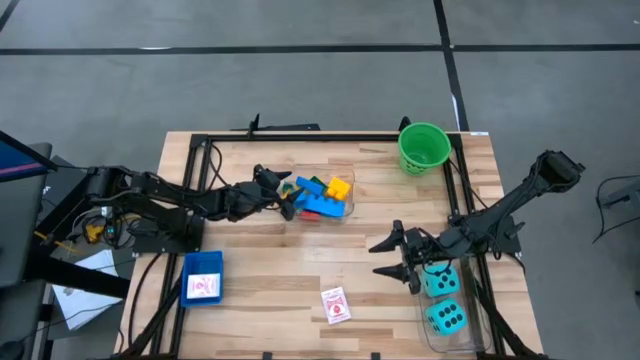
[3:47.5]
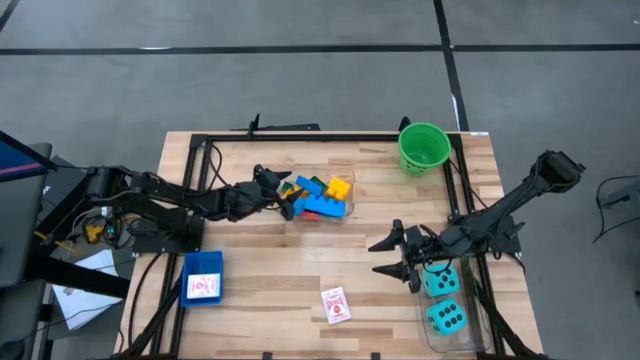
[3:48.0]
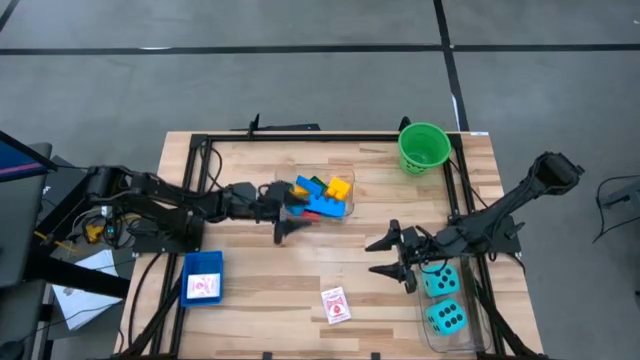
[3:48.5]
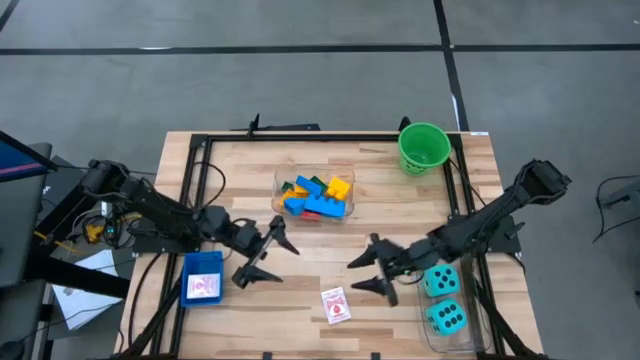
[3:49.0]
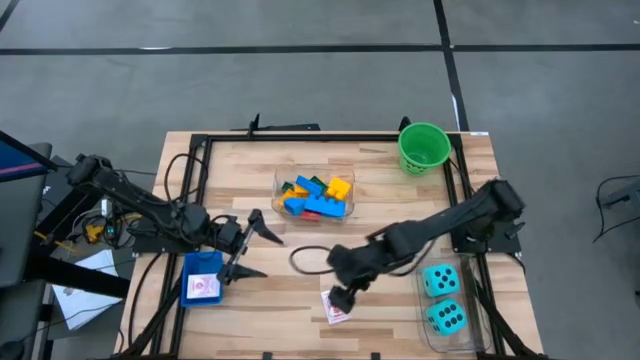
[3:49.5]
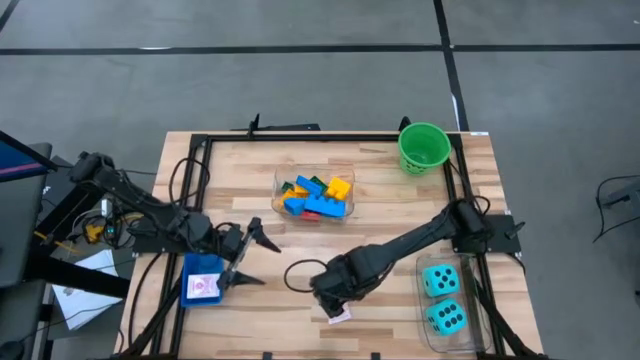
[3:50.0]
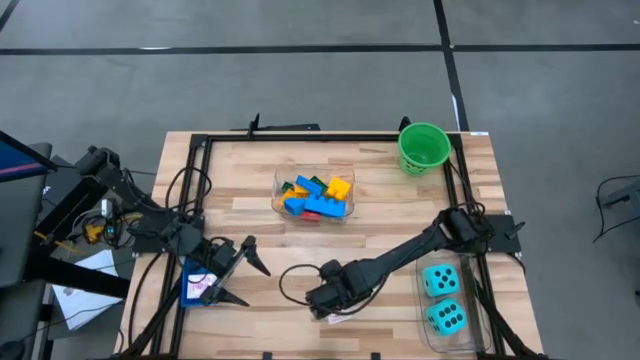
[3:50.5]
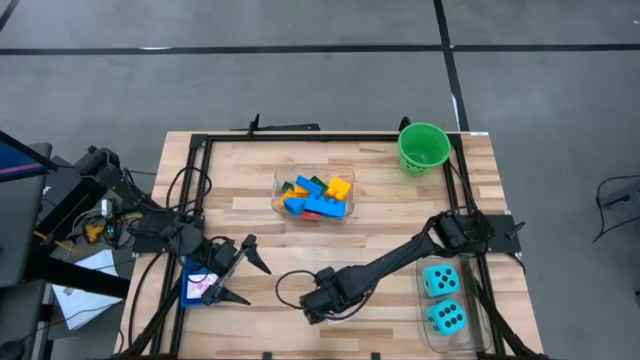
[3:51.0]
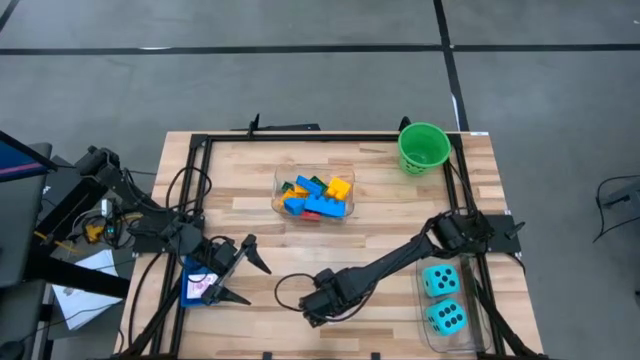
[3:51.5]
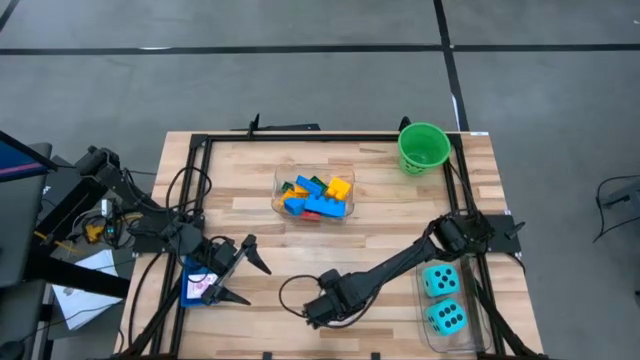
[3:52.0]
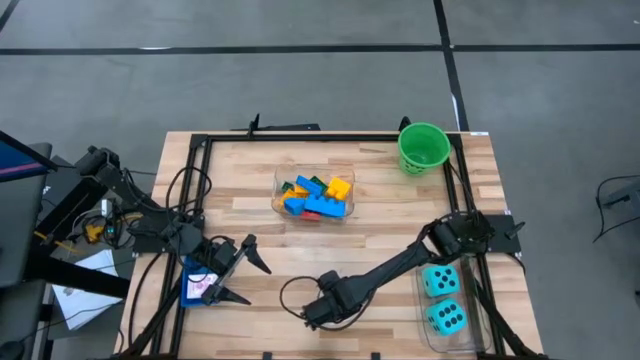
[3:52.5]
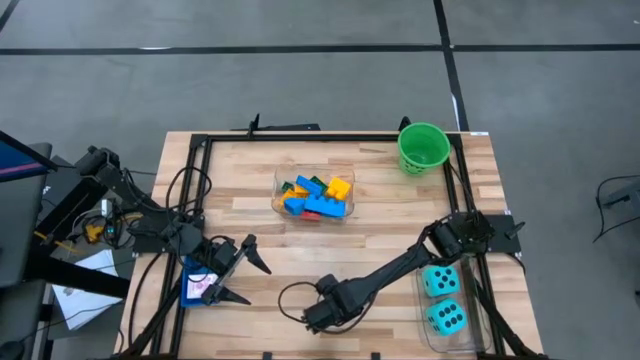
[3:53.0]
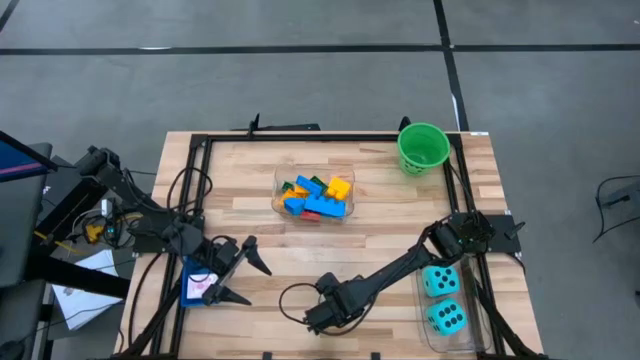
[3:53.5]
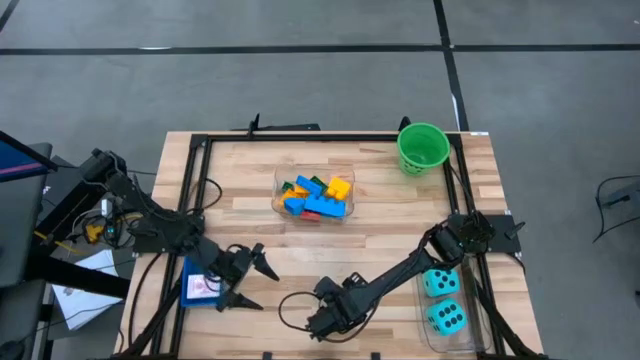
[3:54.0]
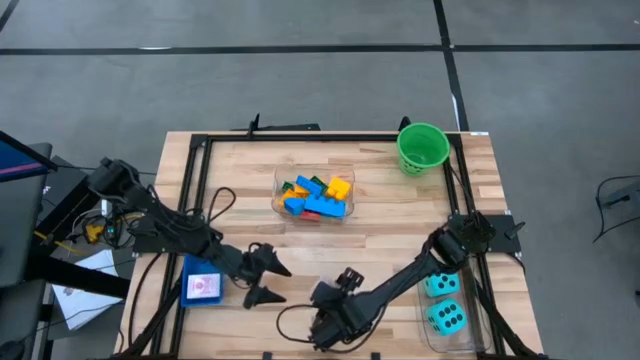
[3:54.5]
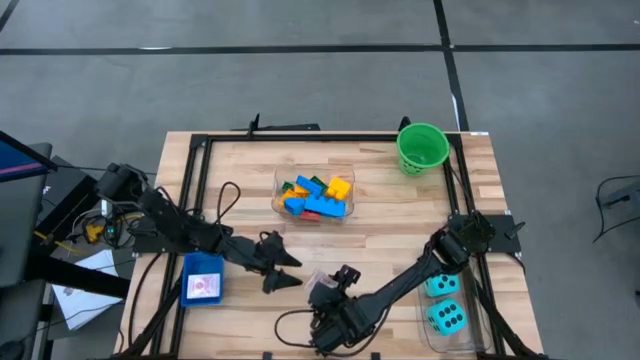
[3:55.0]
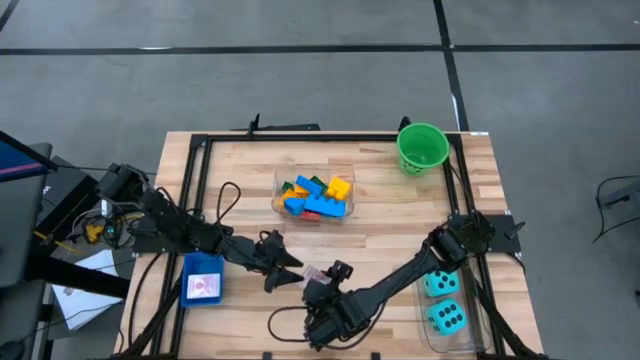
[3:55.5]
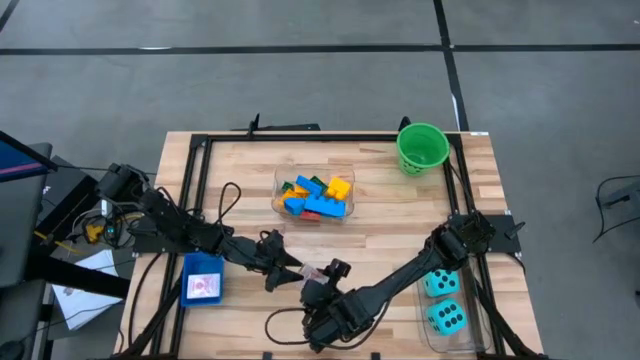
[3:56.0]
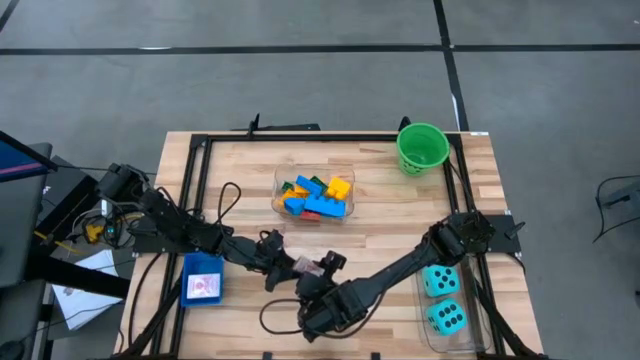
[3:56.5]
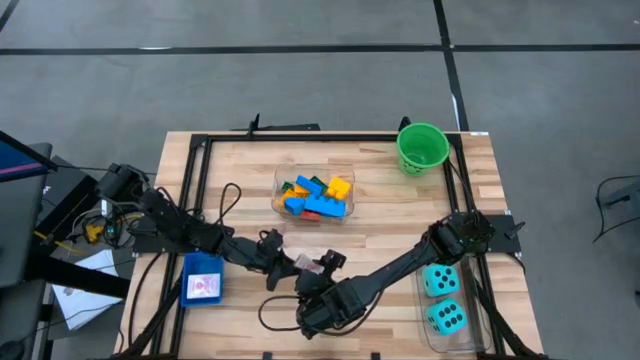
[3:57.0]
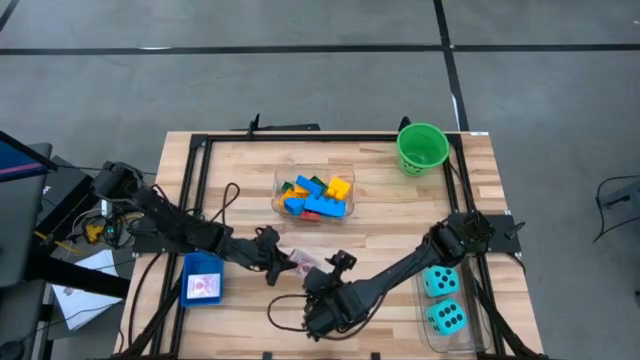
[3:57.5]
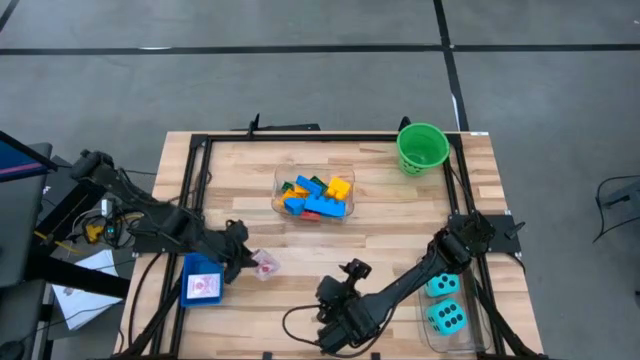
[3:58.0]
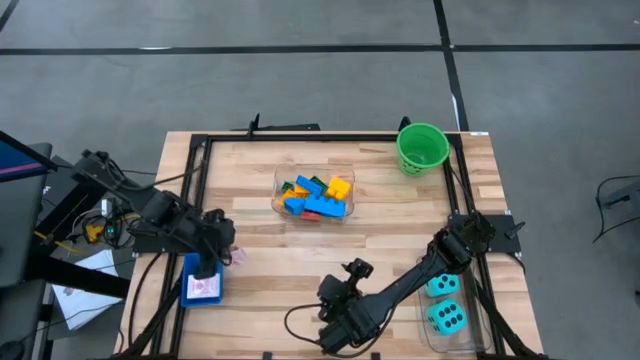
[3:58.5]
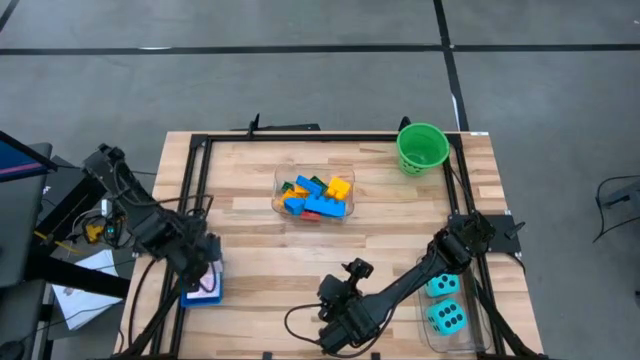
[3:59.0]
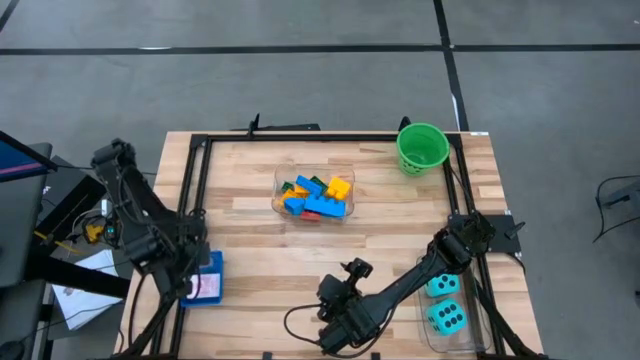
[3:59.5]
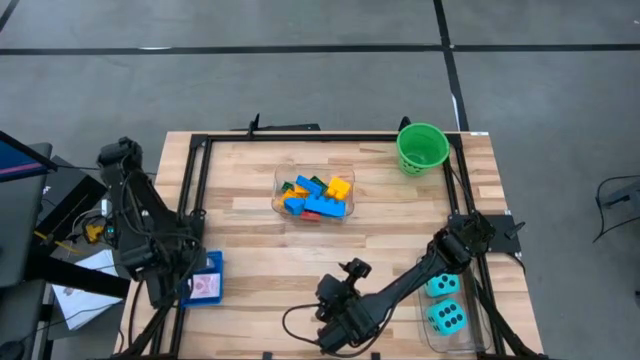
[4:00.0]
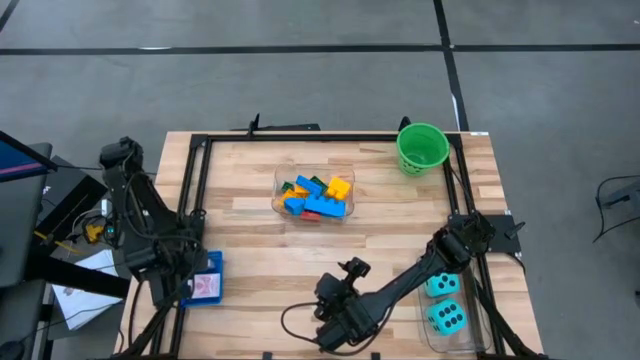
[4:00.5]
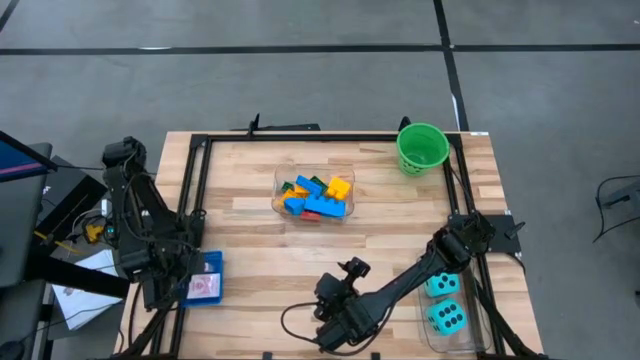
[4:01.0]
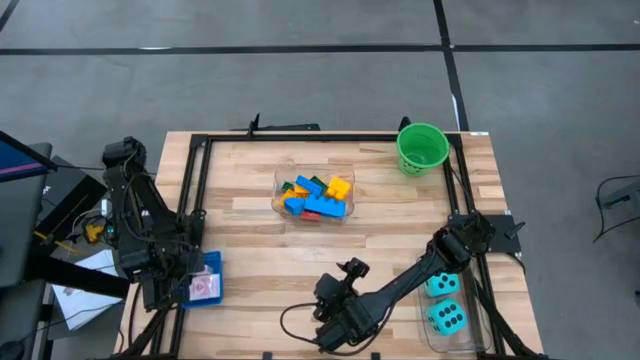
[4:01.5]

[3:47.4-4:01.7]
Task: Pick & Place Toys
Put the red playing card box into the blue bin

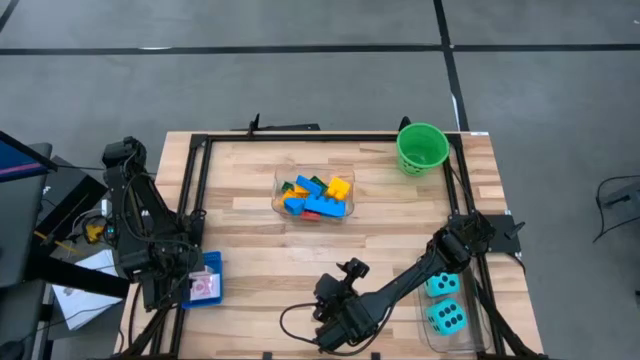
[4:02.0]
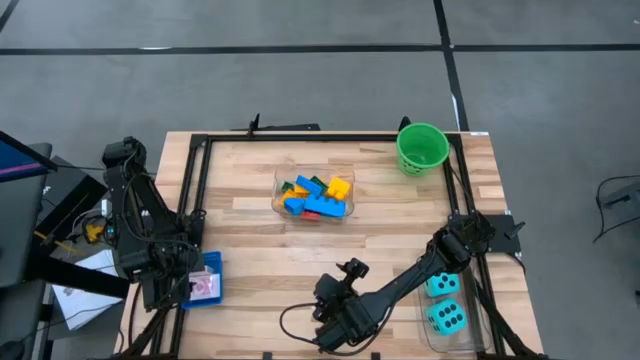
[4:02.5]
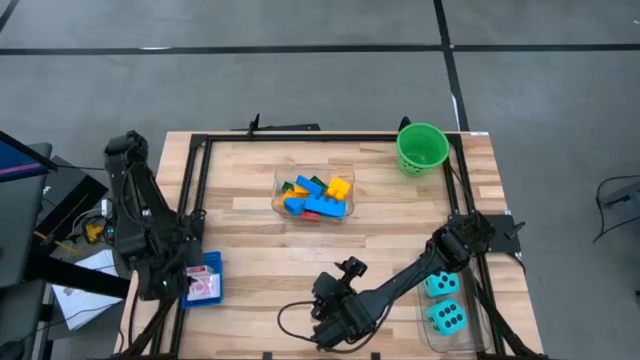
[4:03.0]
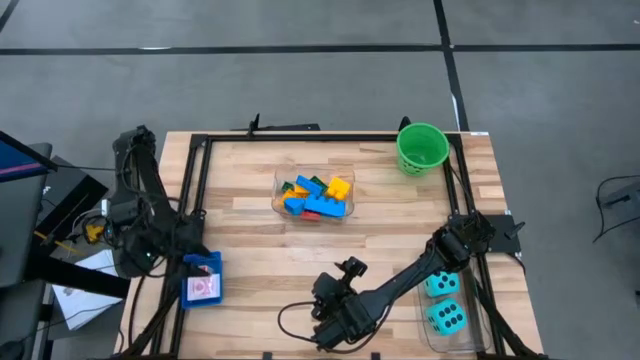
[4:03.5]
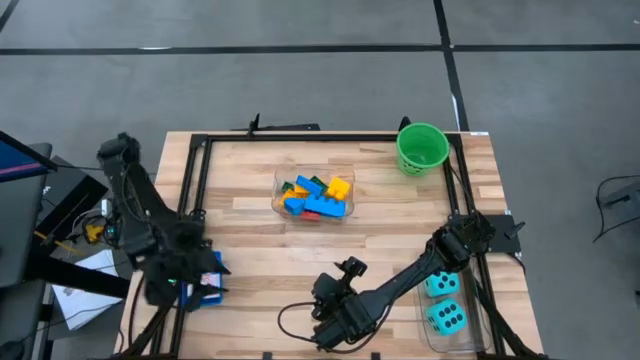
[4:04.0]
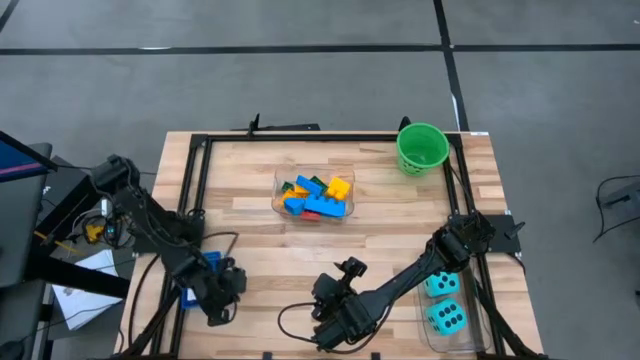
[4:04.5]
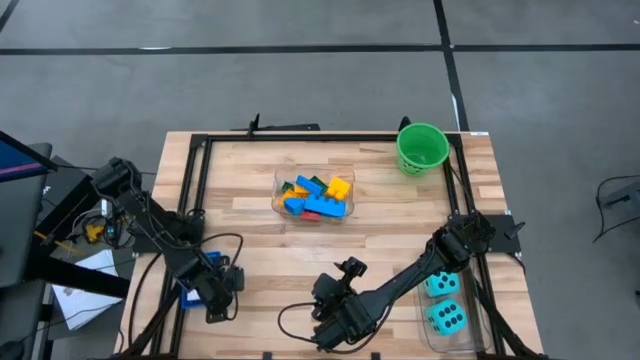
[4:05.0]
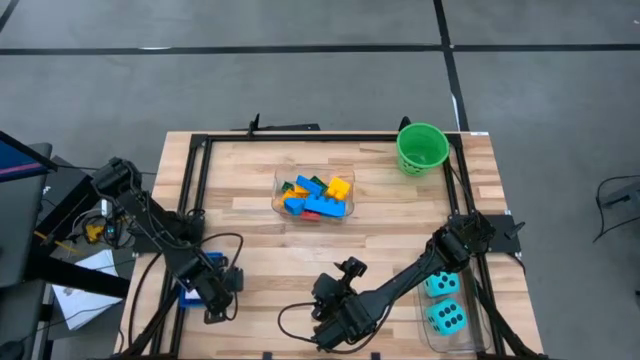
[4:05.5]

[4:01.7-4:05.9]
Adjust the blue bin on the table

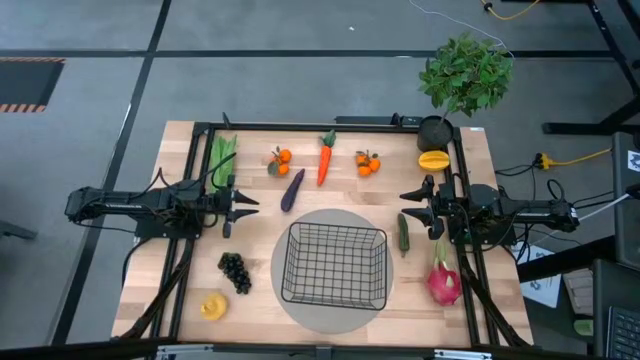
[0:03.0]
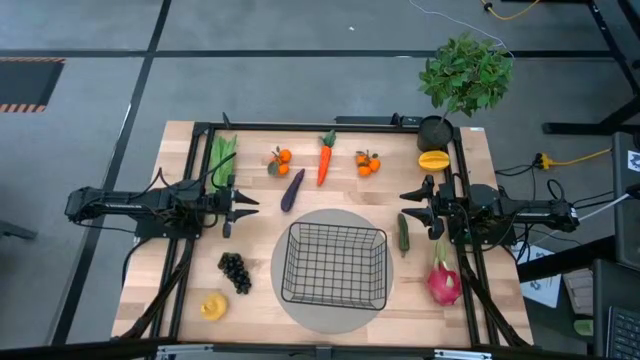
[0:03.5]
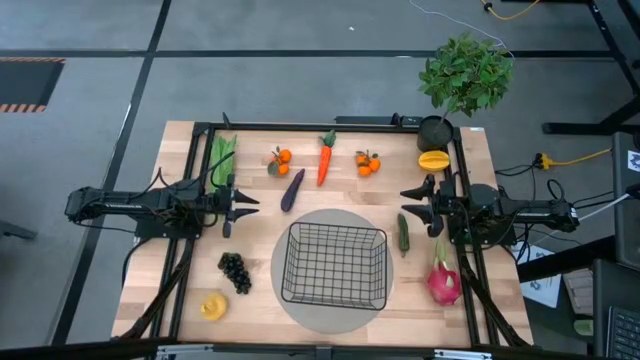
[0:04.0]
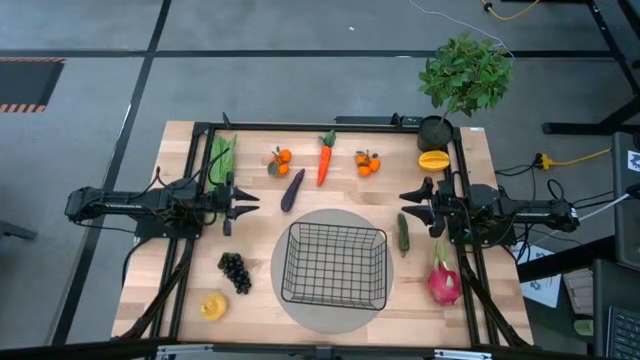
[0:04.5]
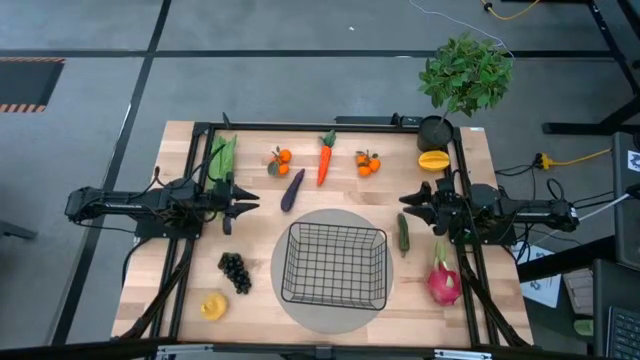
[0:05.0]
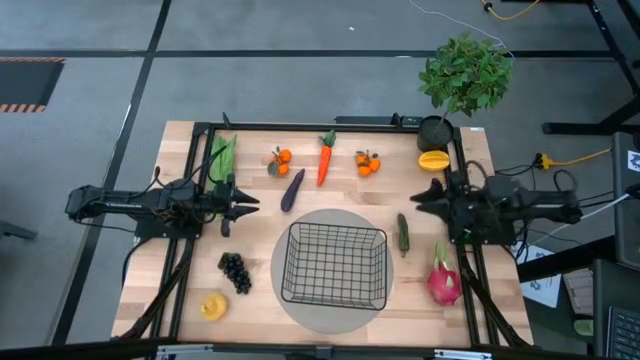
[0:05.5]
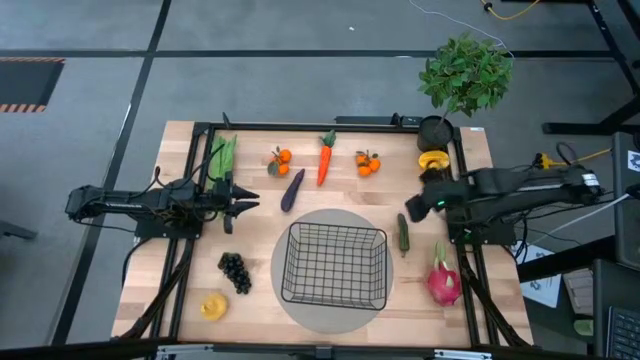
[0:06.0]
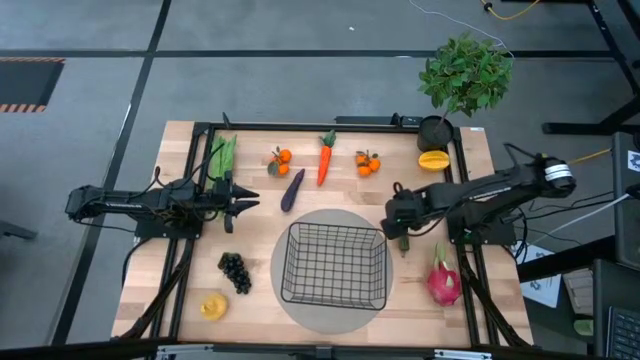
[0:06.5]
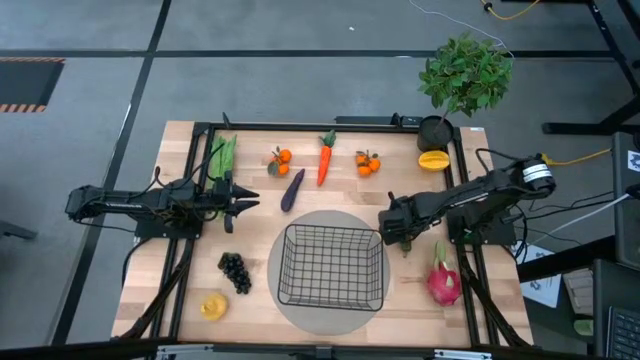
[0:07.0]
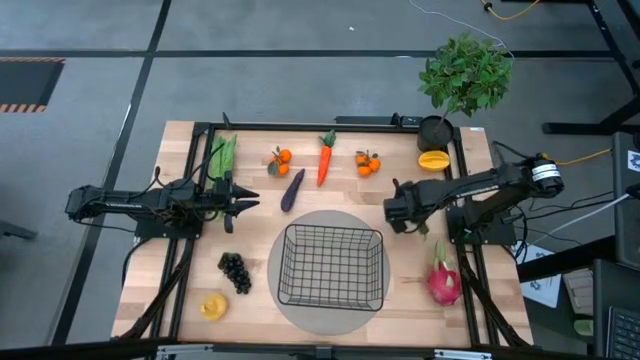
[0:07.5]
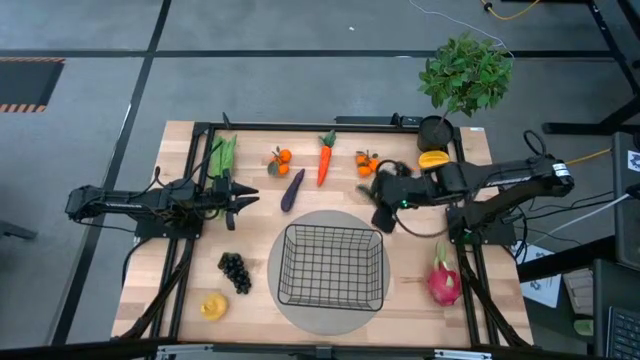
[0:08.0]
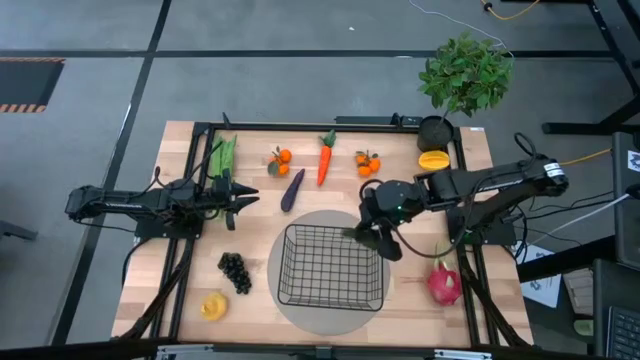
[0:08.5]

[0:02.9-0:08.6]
Task: Build produce basket
Put the green chili pepper into the black wire basket
